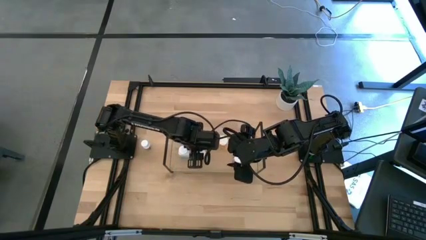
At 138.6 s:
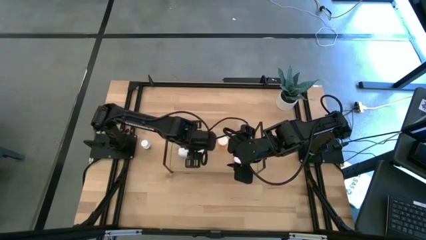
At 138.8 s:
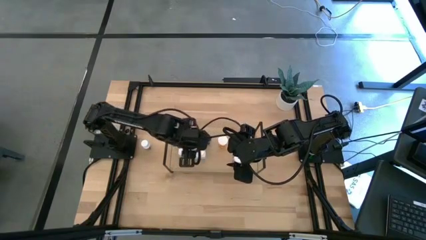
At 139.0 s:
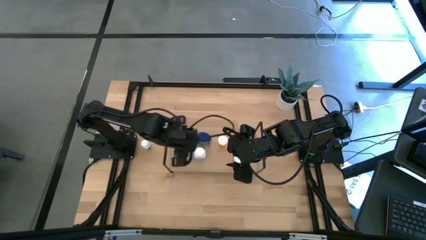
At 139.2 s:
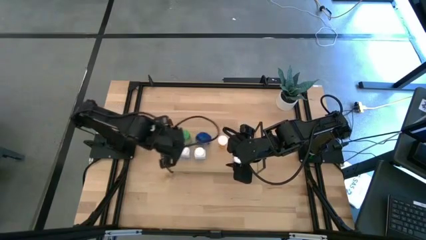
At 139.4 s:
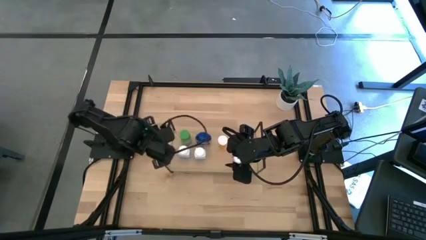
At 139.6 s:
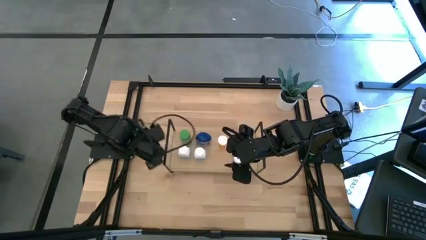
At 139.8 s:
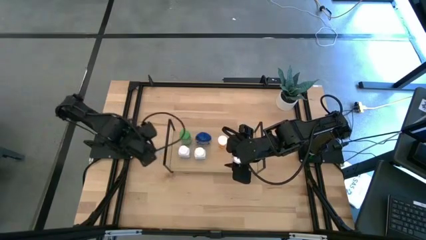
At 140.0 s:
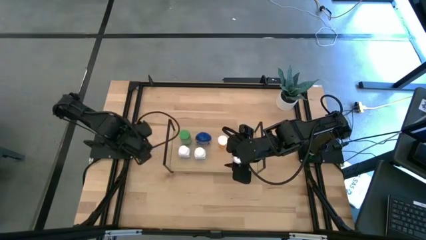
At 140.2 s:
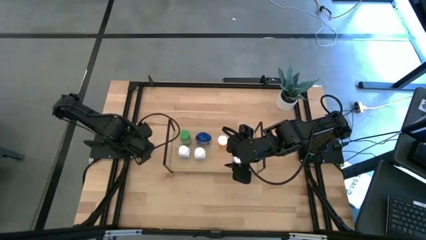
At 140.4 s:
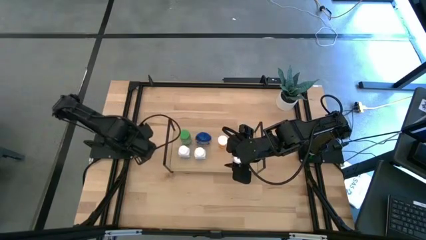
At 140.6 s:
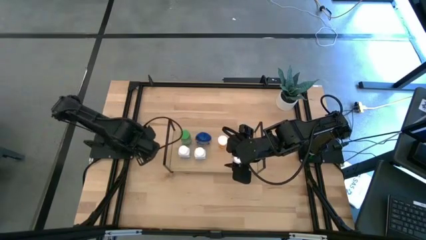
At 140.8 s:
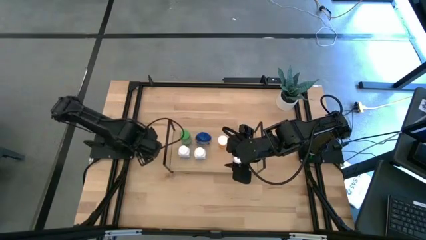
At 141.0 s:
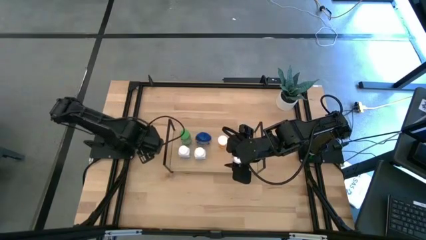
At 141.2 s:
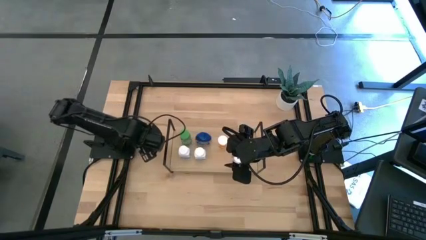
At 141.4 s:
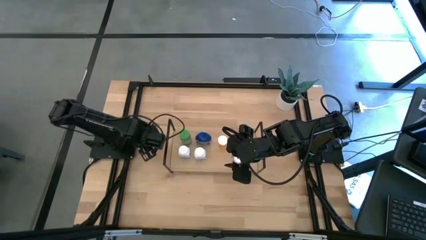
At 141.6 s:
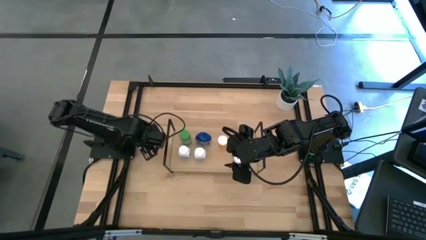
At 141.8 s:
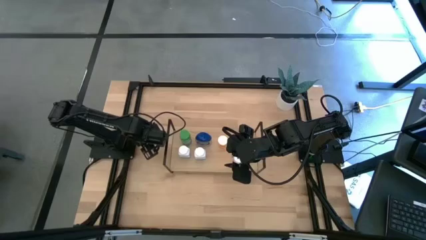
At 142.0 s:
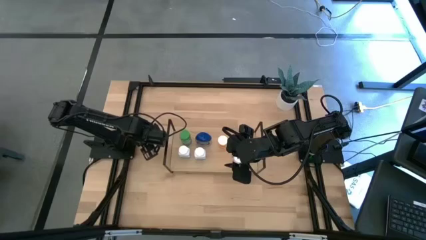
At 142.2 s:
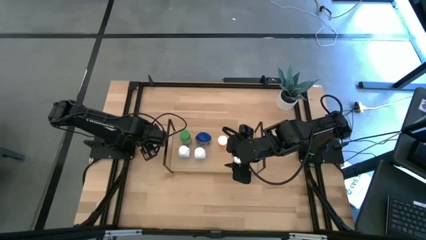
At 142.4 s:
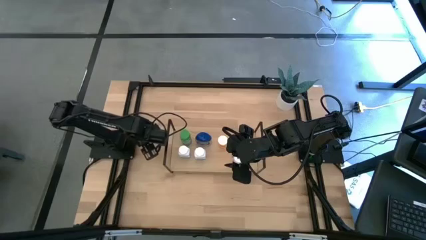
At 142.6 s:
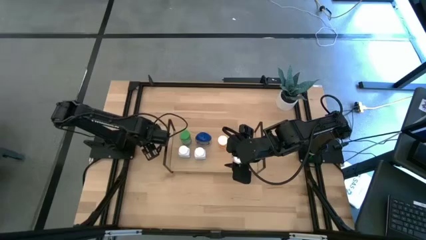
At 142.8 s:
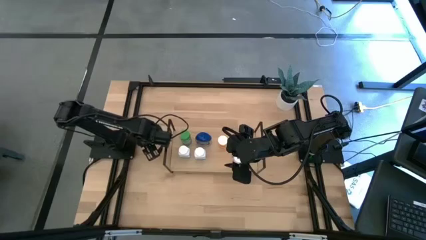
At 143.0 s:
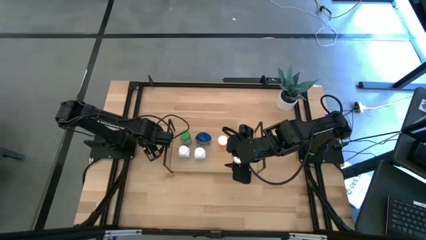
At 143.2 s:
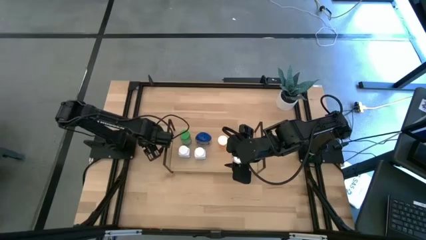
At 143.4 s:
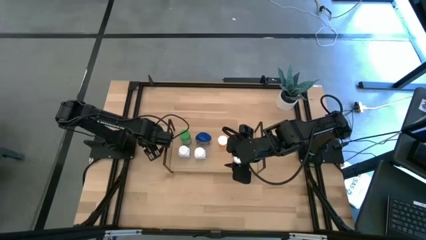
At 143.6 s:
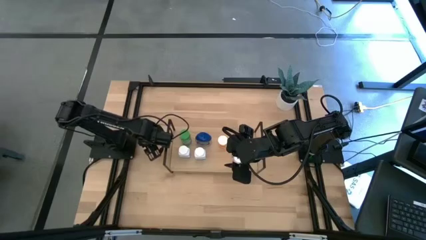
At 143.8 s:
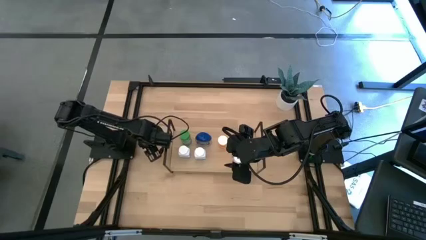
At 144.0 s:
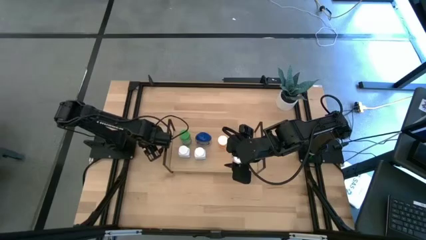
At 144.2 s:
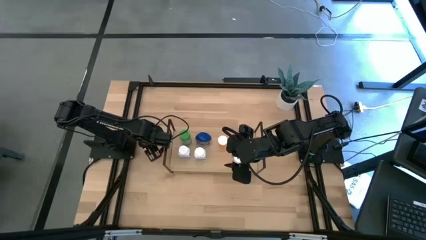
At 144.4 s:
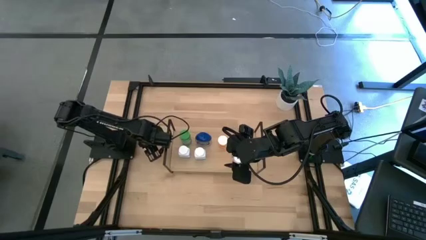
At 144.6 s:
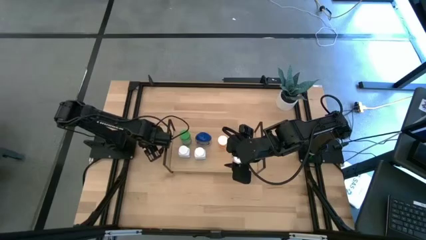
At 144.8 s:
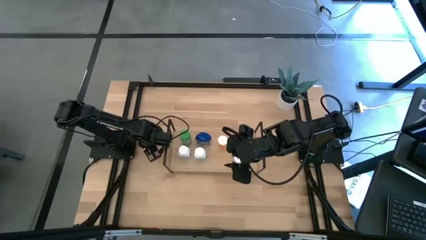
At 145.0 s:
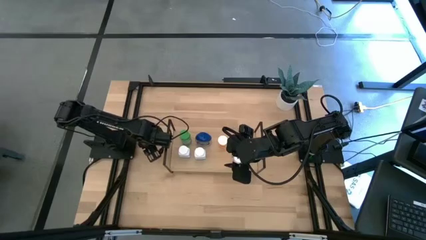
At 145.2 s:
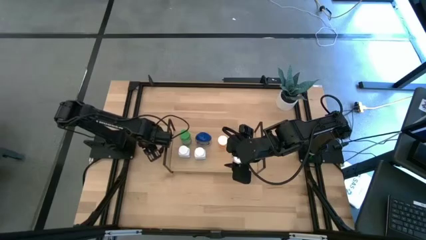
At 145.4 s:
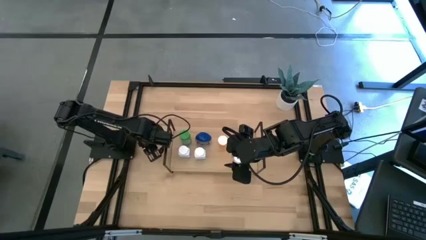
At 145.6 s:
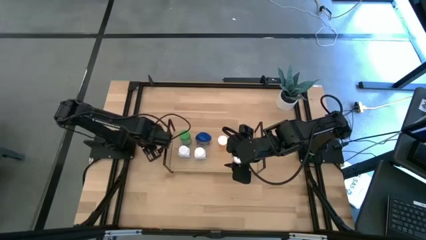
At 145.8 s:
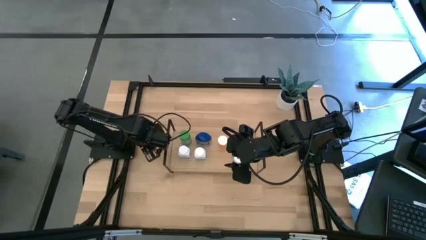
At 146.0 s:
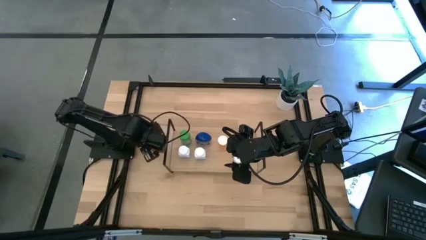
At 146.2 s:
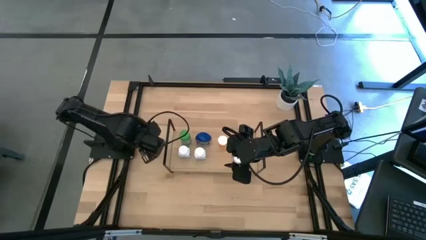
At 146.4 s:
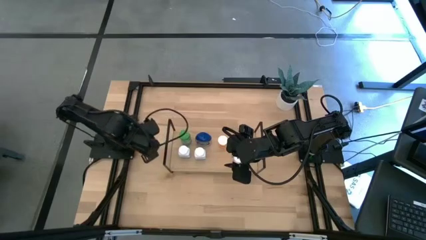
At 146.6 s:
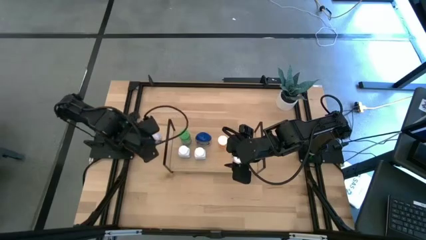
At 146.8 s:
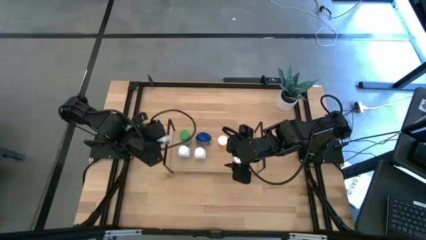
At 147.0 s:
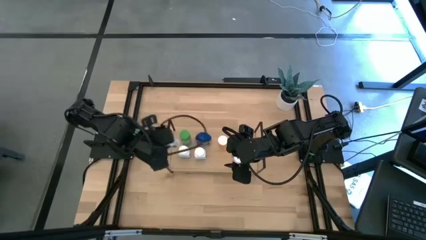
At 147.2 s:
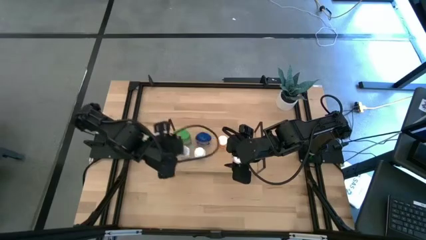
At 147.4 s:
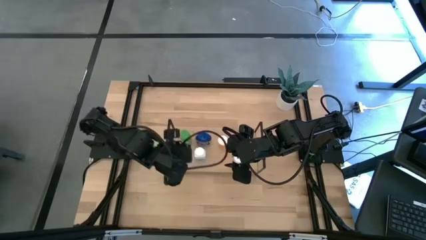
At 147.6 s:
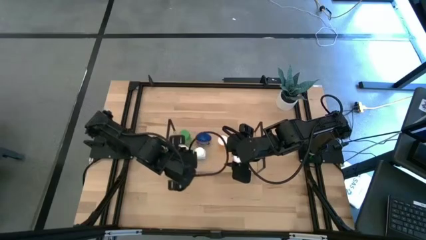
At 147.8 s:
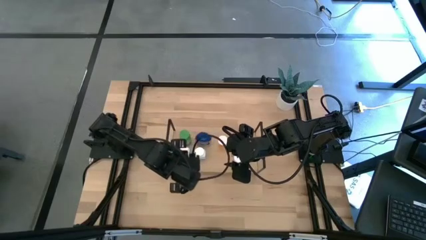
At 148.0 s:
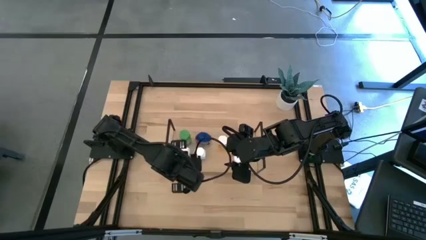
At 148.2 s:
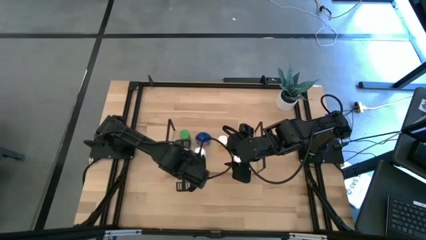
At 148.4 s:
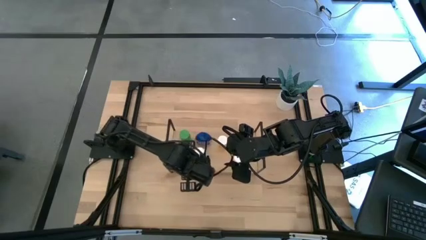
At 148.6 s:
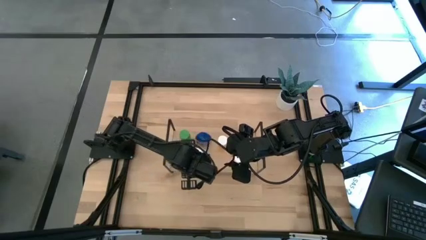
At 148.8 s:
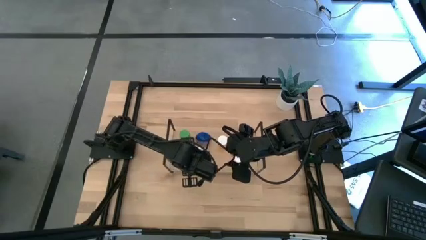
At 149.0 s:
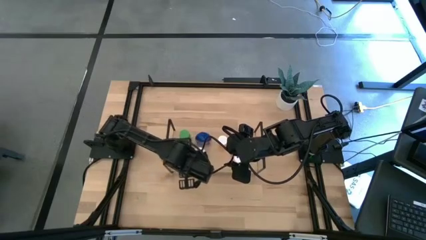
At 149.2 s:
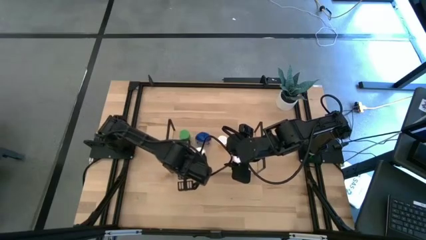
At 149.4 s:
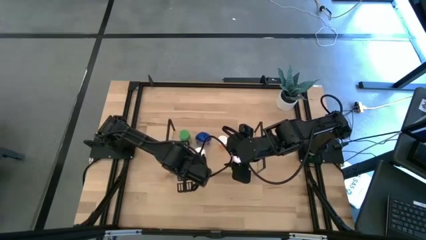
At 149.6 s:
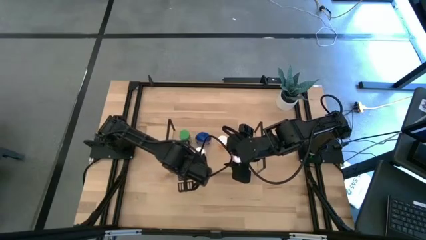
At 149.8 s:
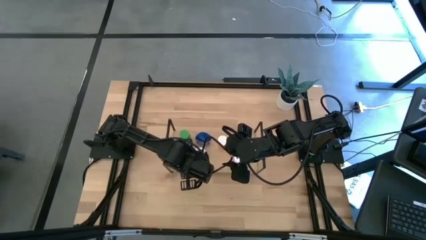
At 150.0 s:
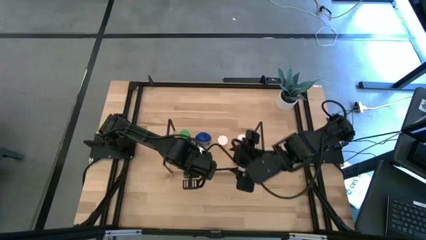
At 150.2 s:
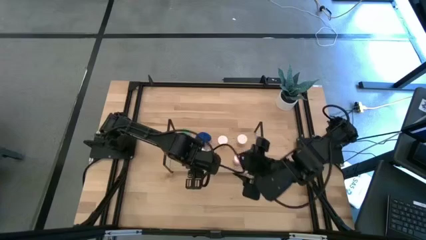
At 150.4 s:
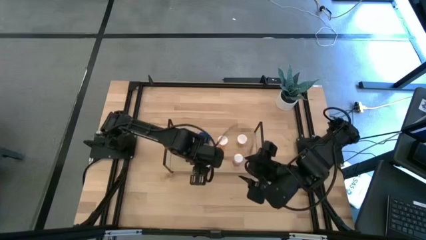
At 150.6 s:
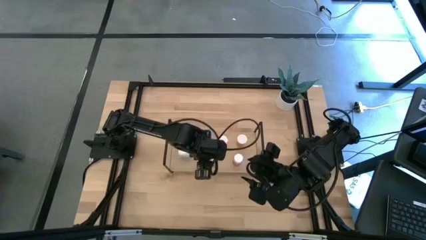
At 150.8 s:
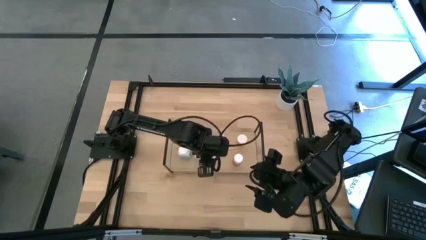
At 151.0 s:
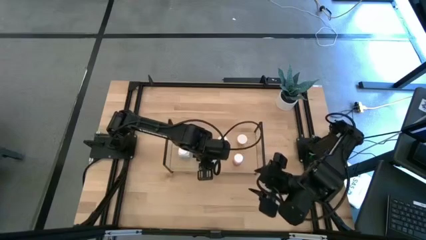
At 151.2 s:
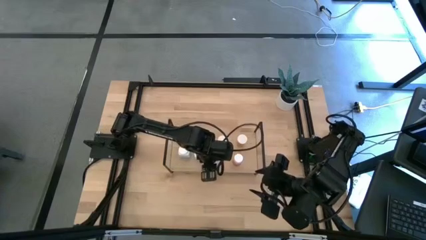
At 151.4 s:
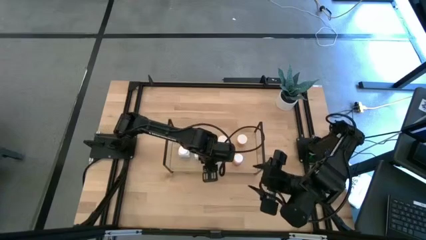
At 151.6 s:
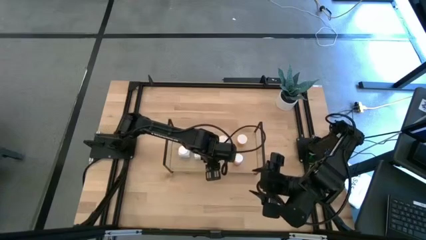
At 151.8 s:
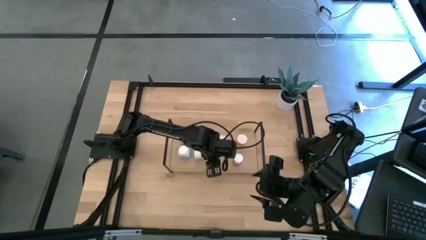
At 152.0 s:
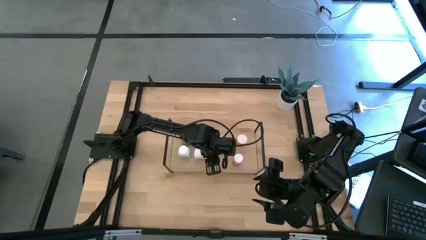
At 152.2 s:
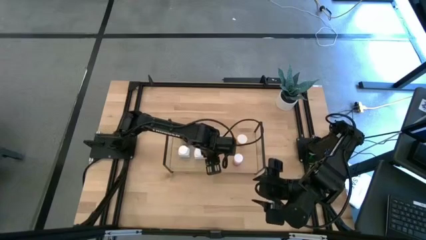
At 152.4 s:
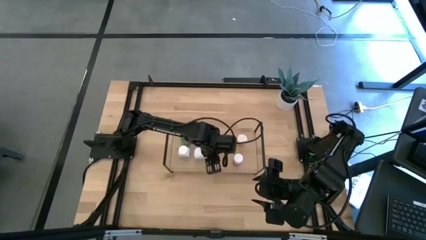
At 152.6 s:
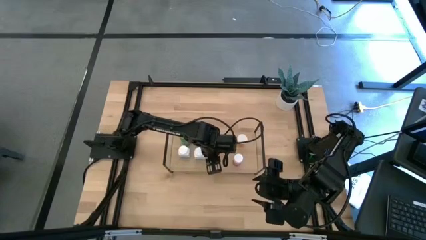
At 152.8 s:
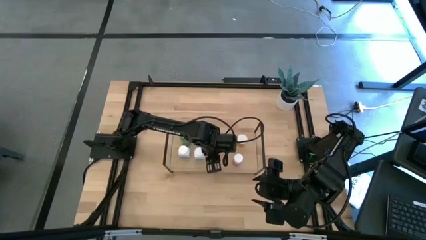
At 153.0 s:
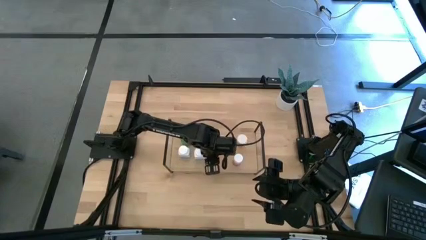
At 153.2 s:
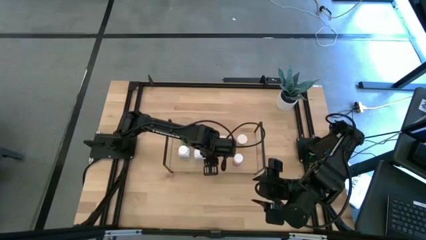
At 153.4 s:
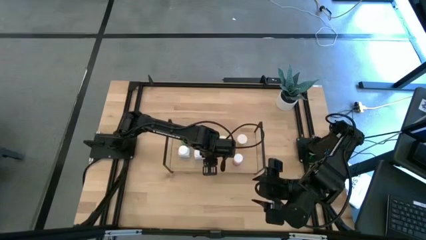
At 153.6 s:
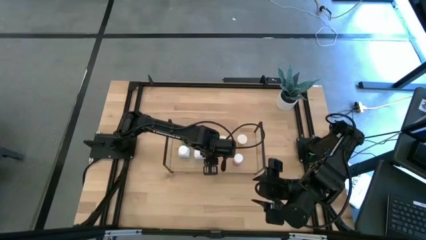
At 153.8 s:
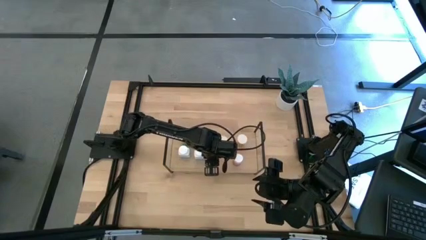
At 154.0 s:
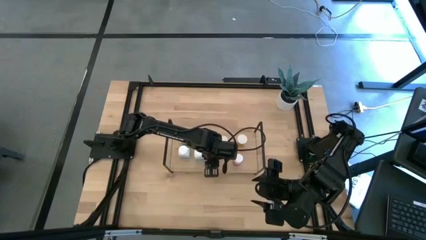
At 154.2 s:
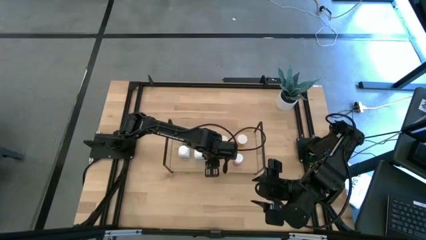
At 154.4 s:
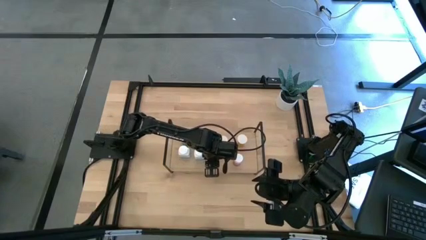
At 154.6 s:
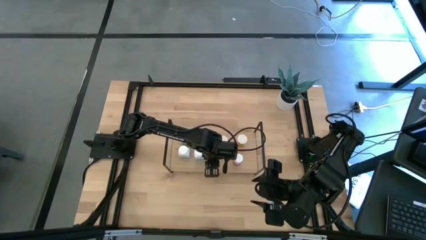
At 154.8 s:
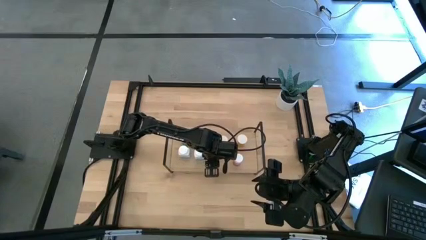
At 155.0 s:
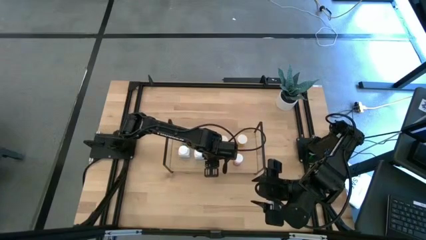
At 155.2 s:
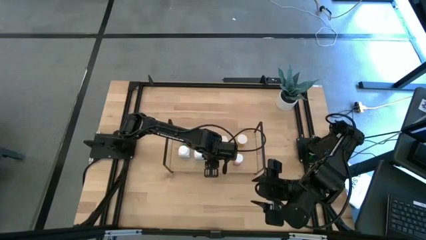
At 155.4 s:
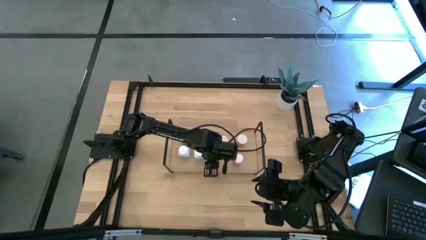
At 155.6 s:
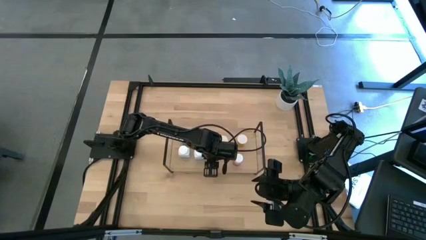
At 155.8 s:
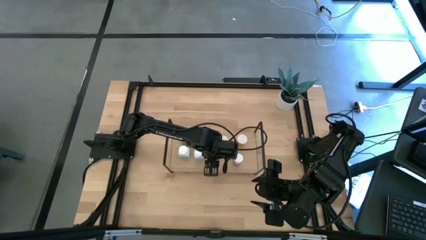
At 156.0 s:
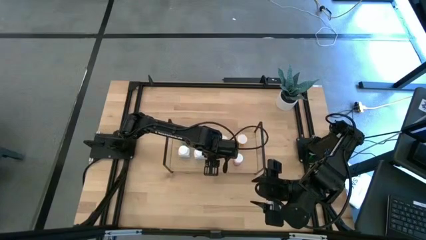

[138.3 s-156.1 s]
Task: Pick and place medicine bottles onto shelf by color
Put the small white pill bottle on the shelf
